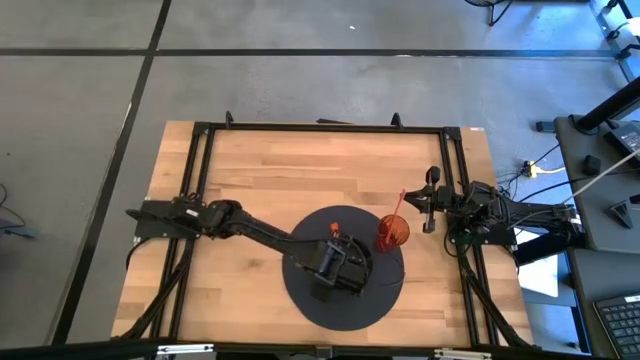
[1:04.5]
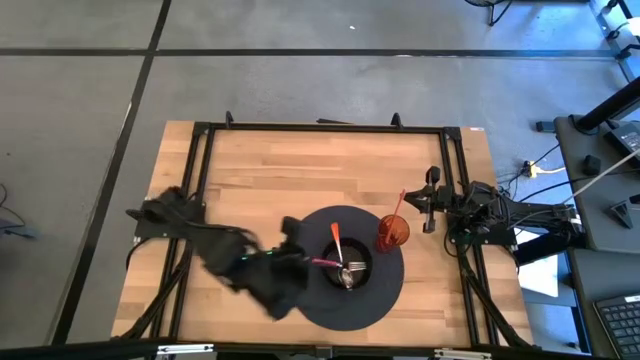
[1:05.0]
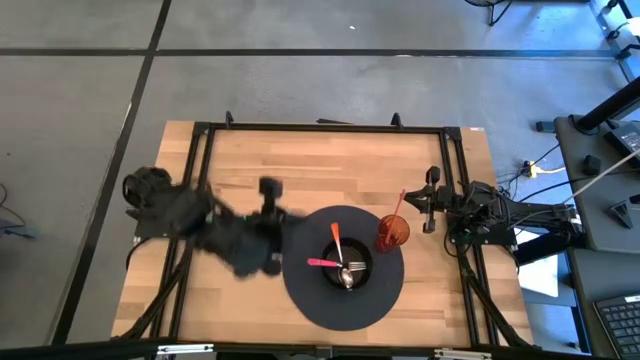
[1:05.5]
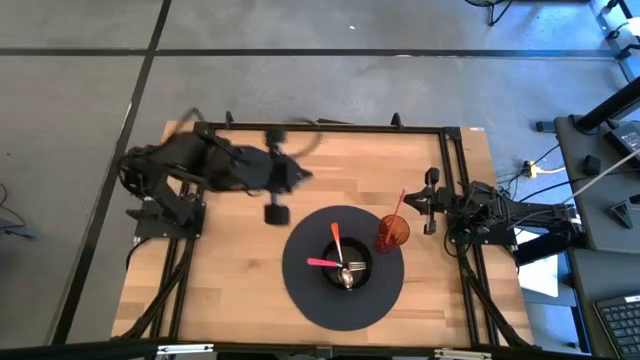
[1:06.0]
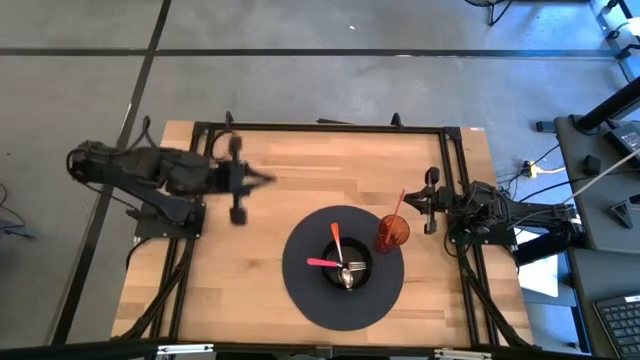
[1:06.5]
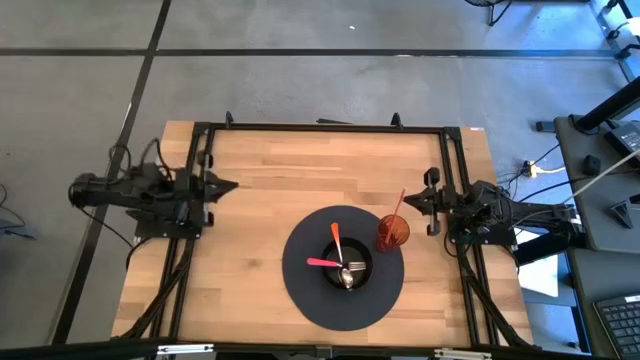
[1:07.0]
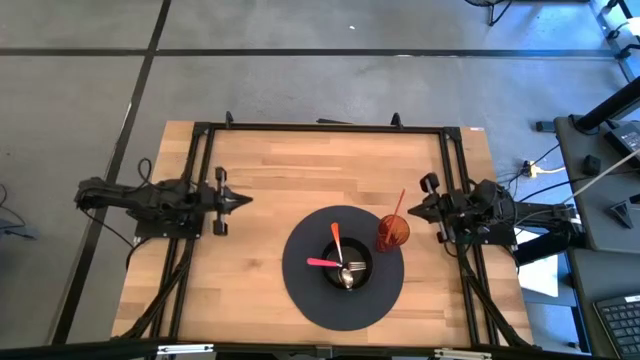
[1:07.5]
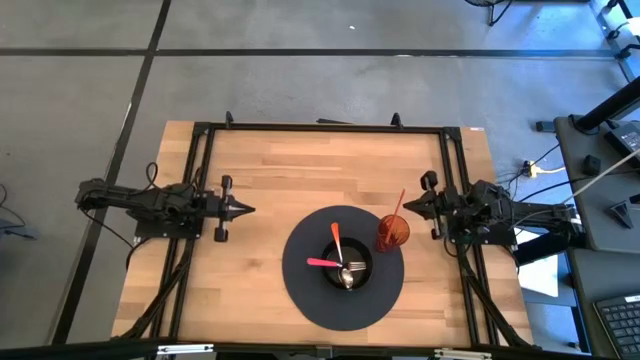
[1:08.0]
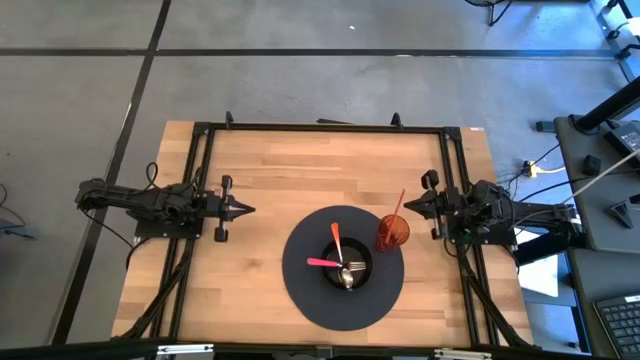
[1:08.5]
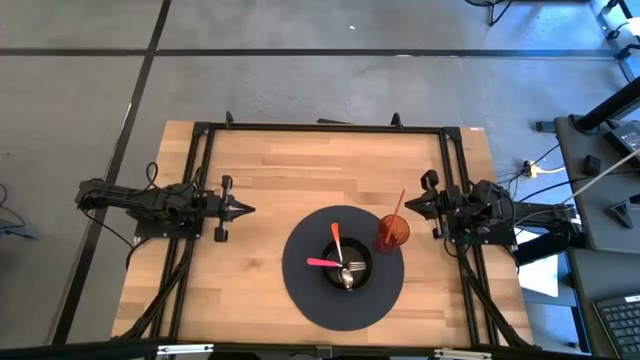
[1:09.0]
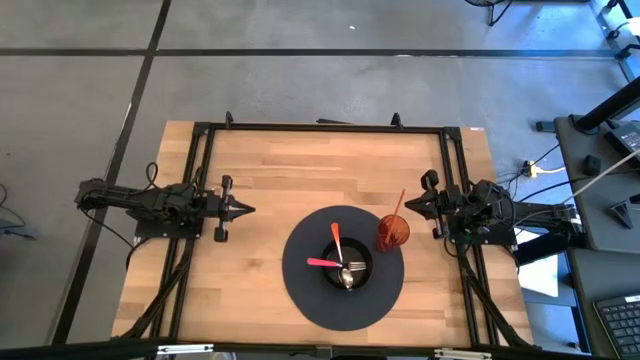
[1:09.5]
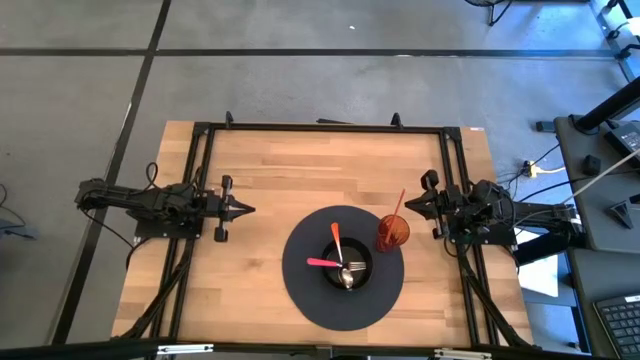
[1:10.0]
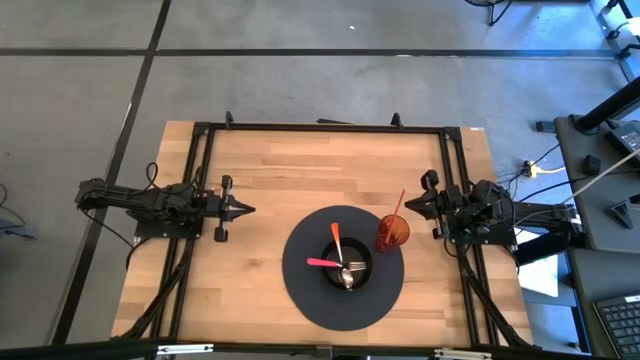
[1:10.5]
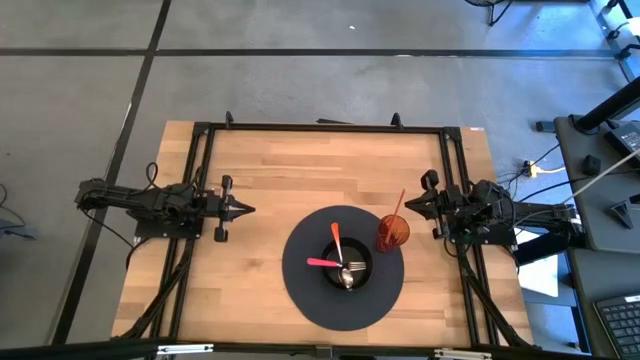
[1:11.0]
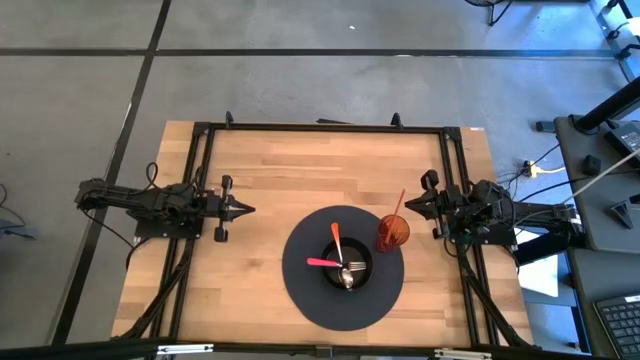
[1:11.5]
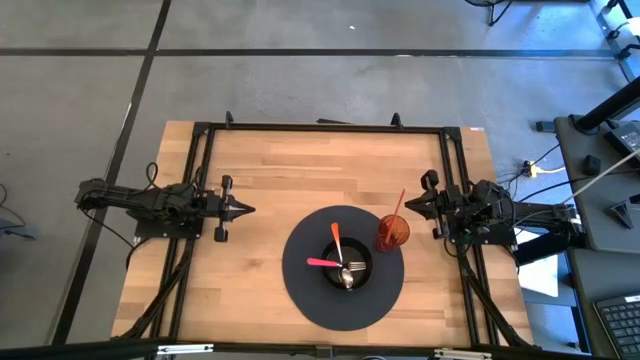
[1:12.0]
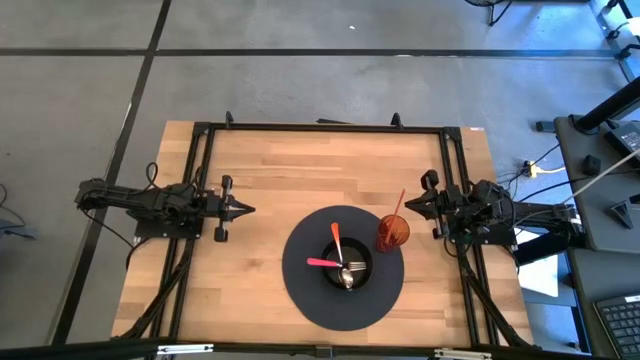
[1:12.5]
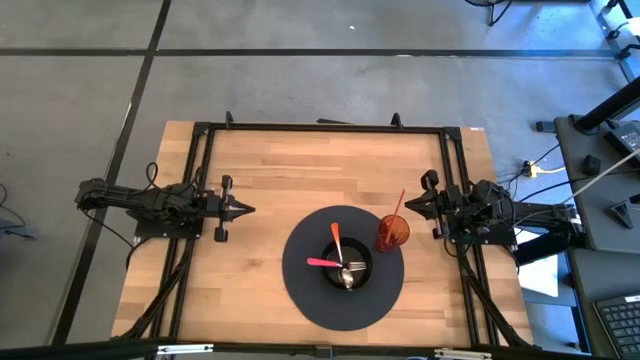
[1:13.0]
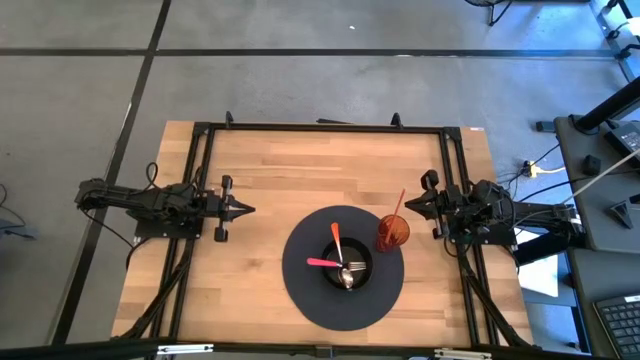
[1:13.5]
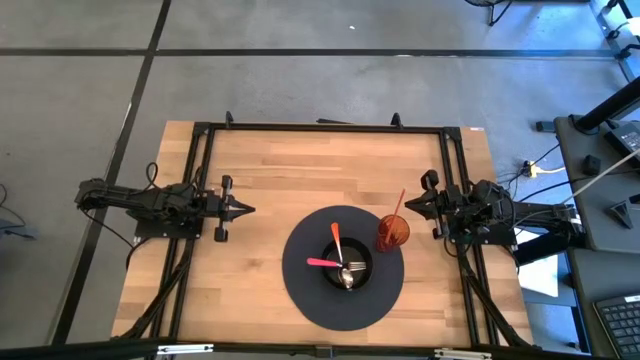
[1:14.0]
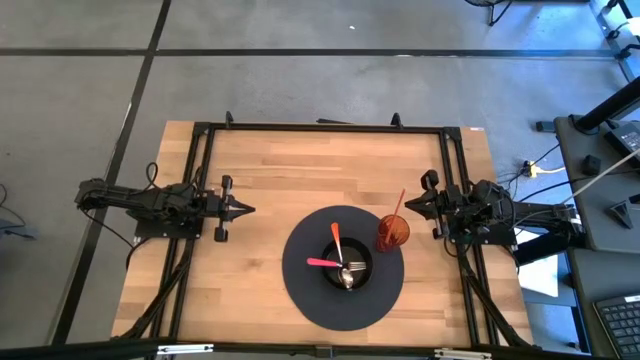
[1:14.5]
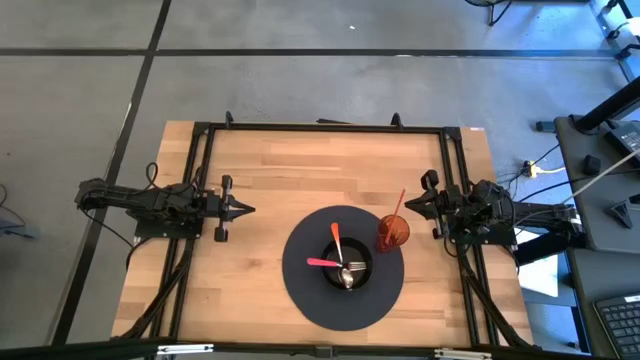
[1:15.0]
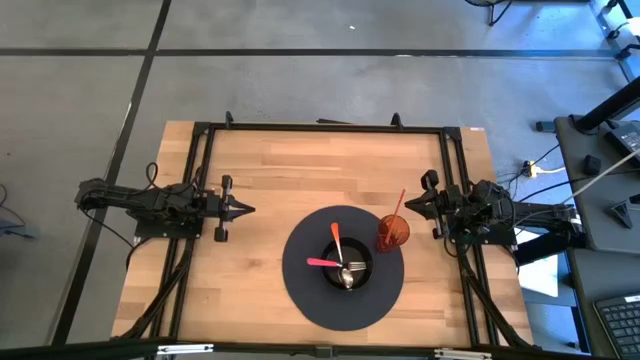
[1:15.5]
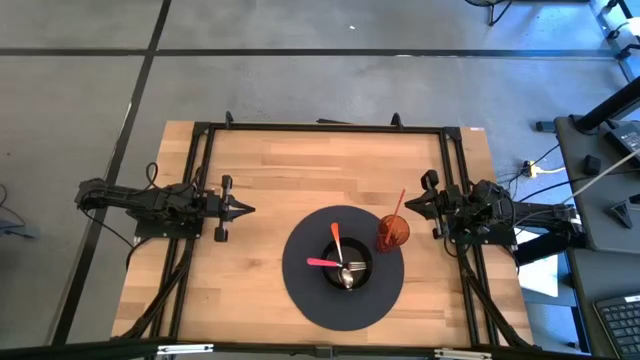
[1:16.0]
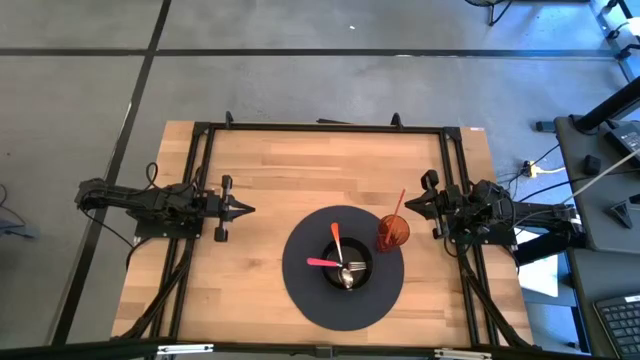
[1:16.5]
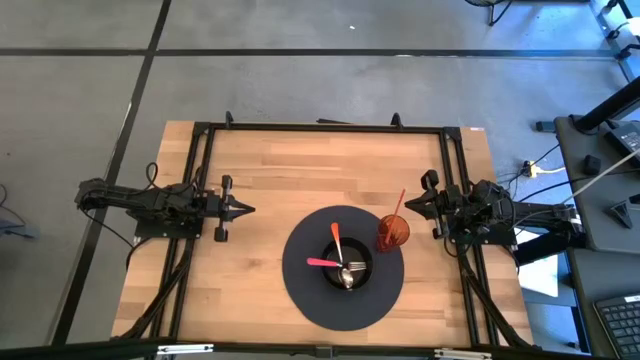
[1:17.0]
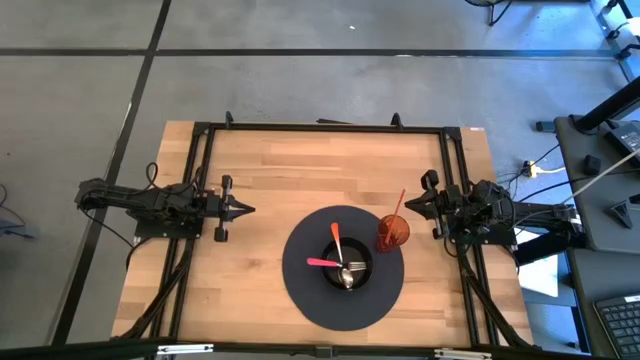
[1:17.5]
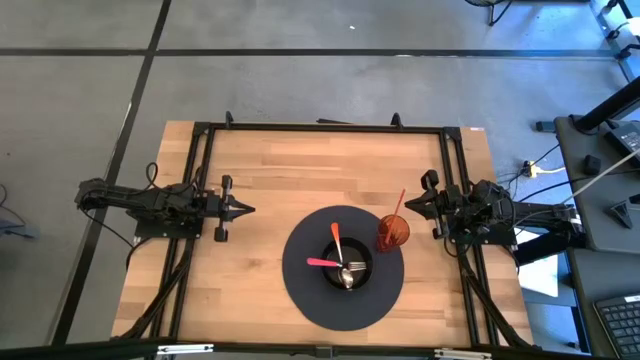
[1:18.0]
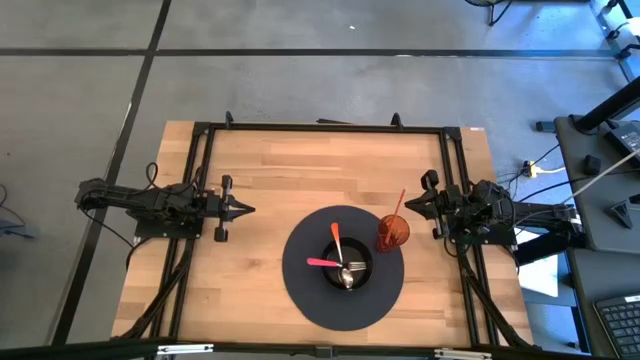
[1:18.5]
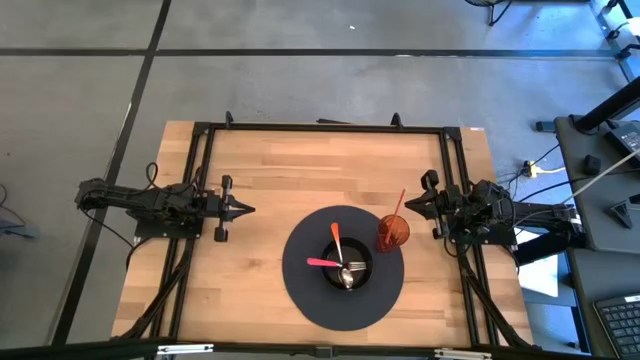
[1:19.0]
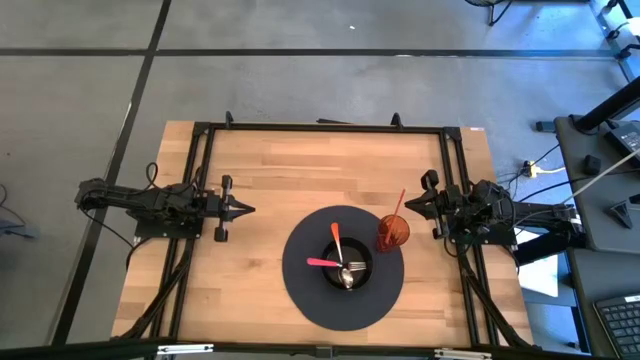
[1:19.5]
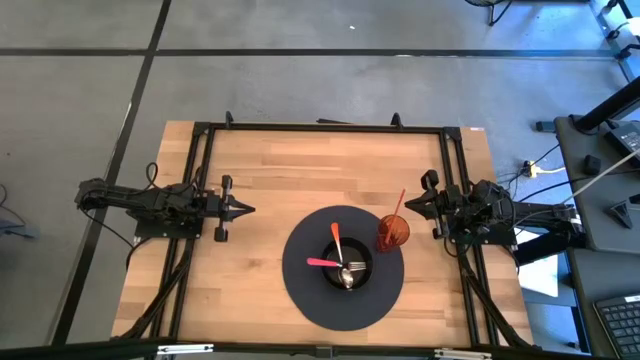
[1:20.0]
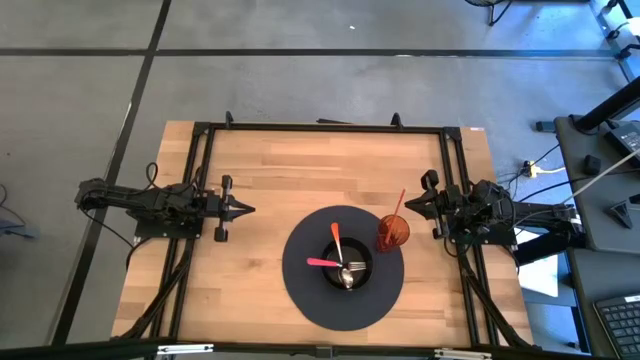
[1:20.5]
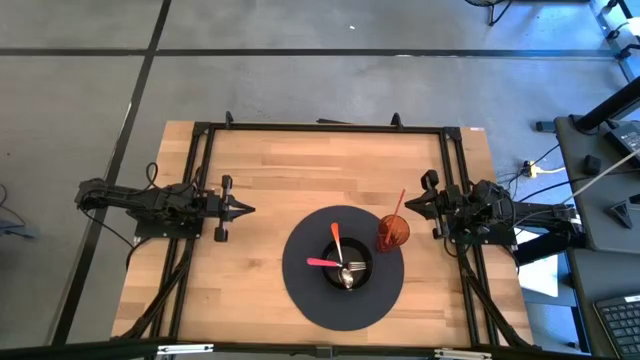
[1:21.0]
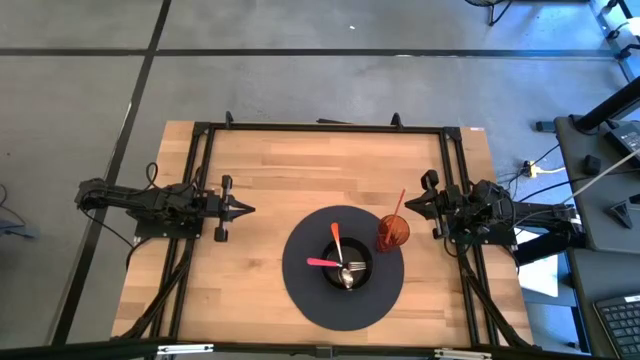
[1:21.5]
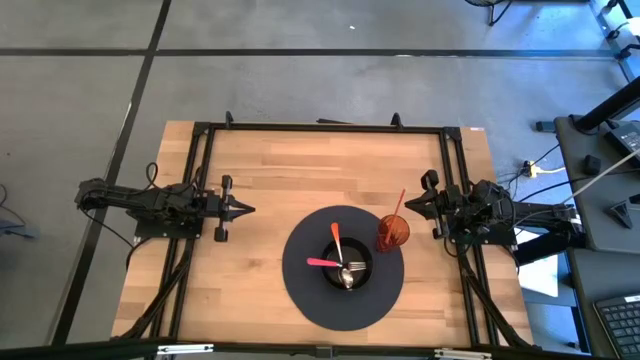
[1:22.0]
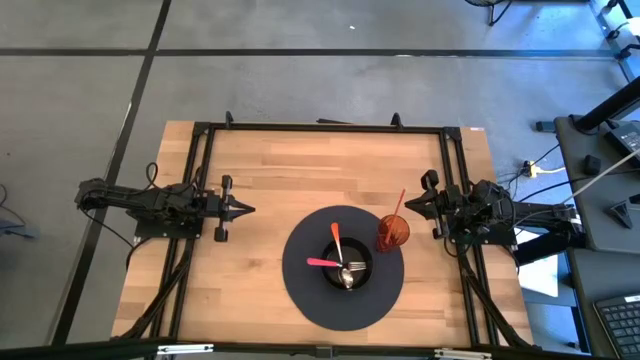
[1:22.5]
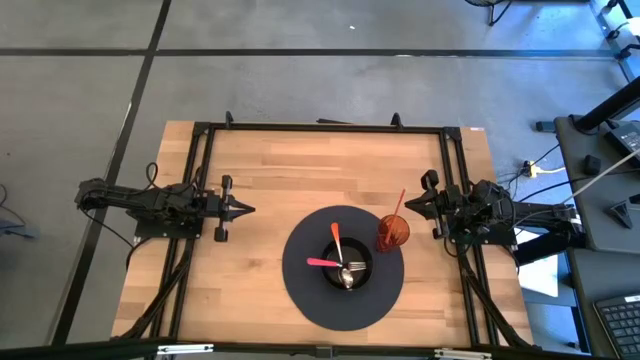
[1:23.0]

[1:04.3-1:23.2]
Task: Pick & Place Utensil
Return to Home Position
